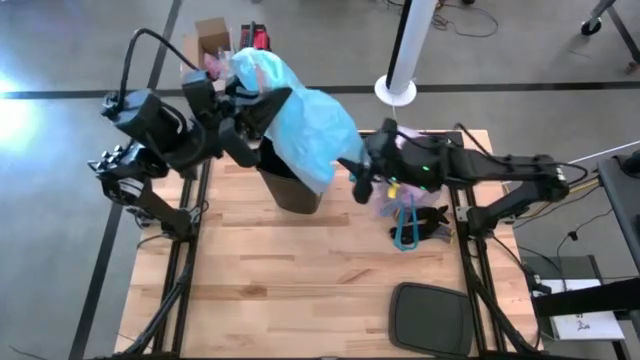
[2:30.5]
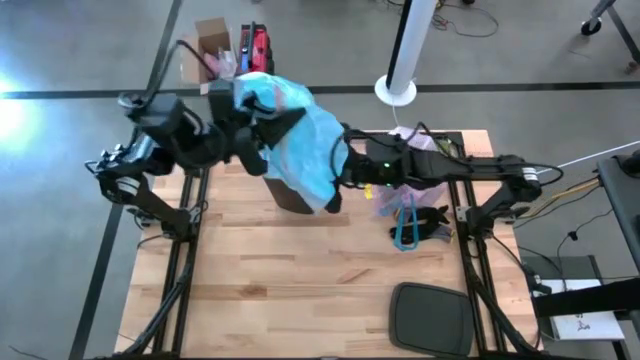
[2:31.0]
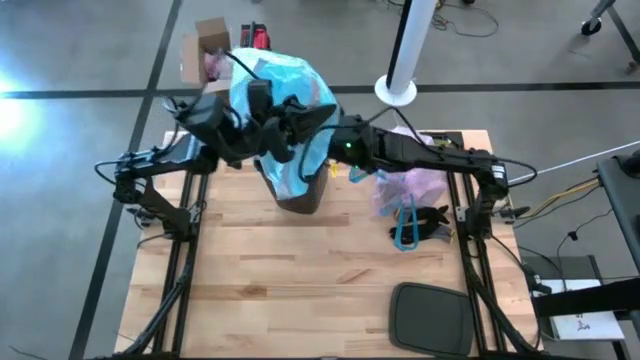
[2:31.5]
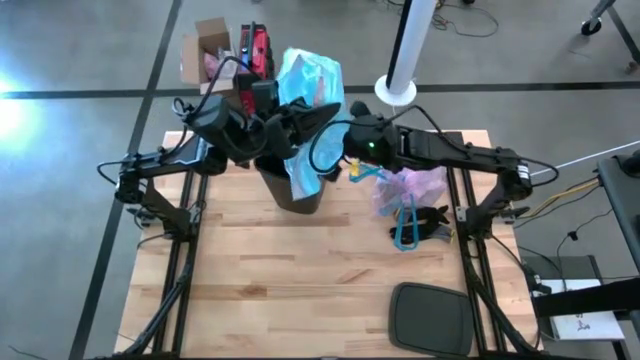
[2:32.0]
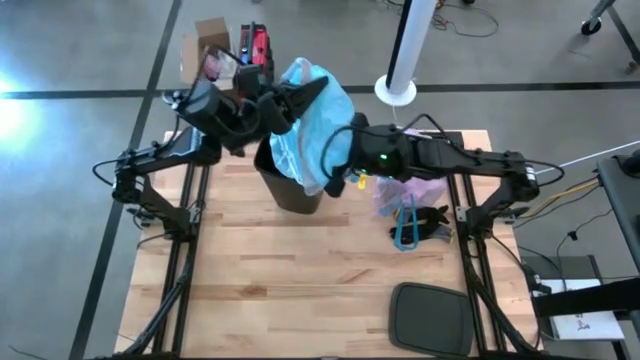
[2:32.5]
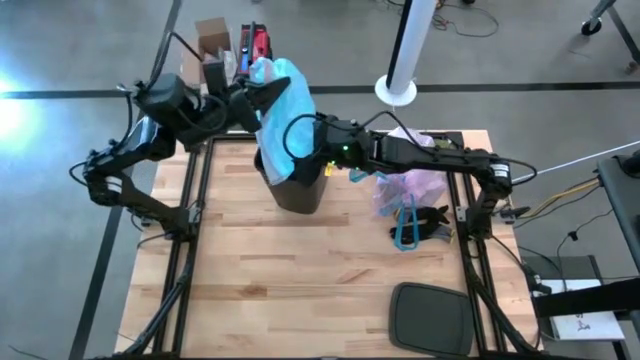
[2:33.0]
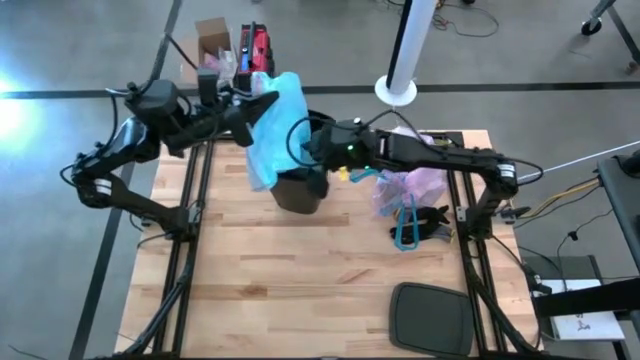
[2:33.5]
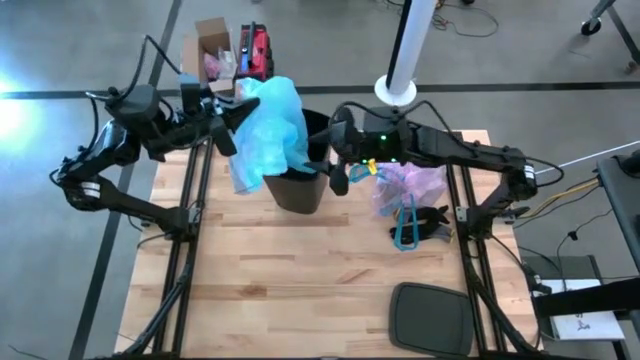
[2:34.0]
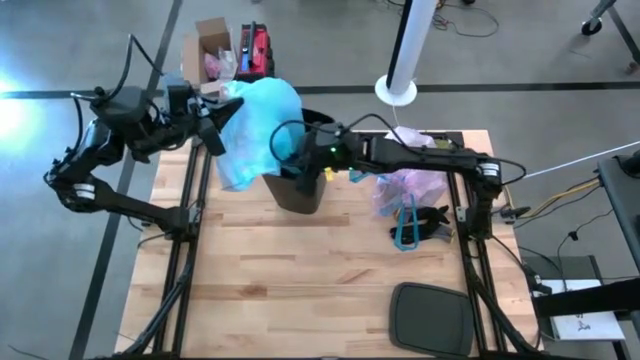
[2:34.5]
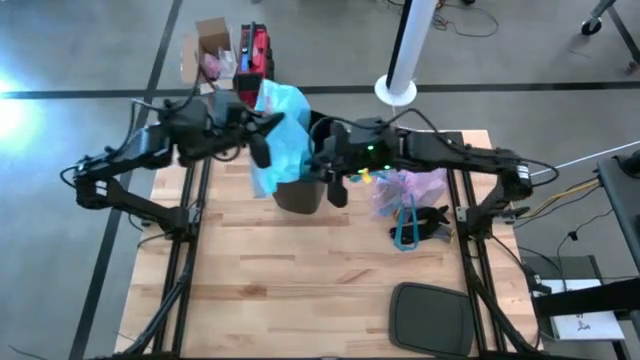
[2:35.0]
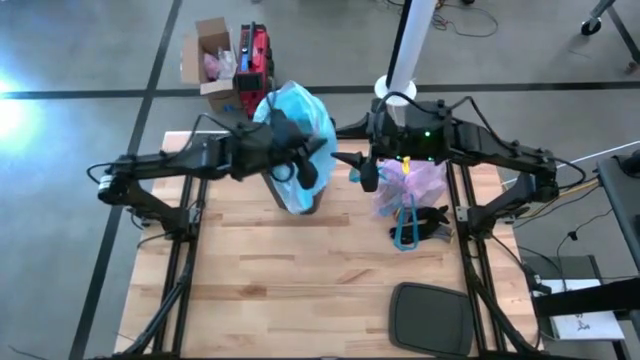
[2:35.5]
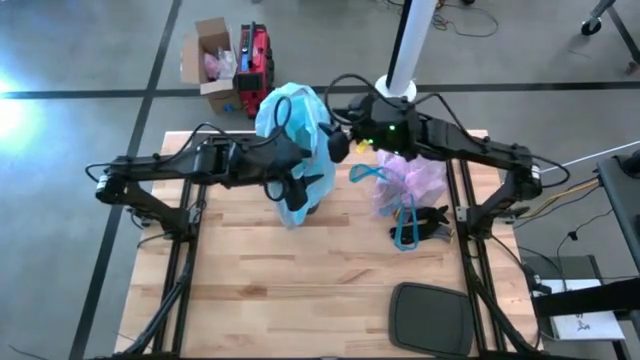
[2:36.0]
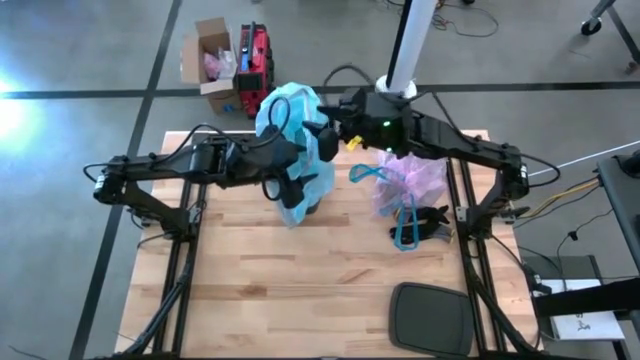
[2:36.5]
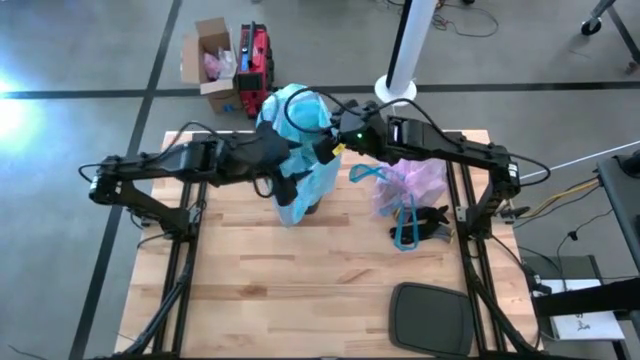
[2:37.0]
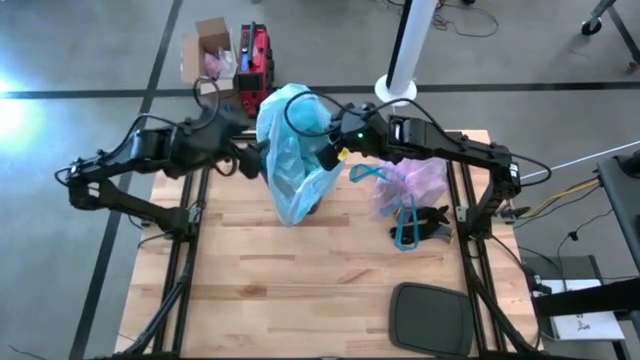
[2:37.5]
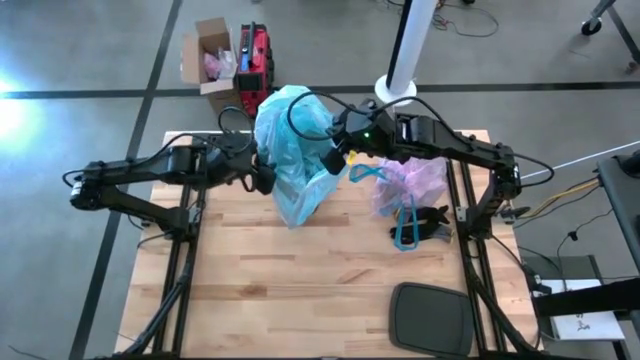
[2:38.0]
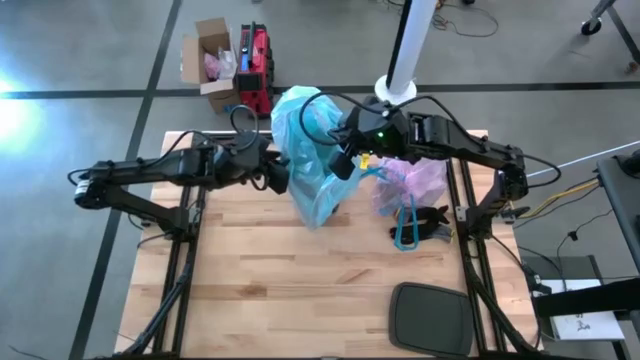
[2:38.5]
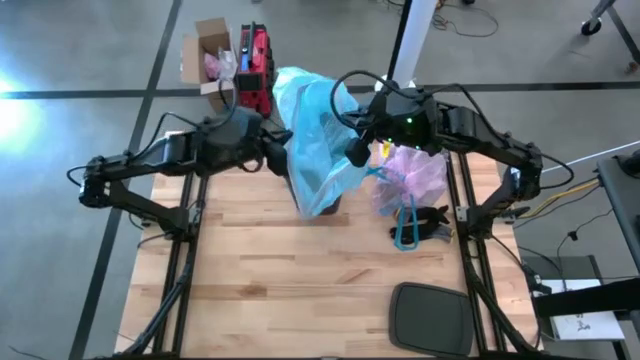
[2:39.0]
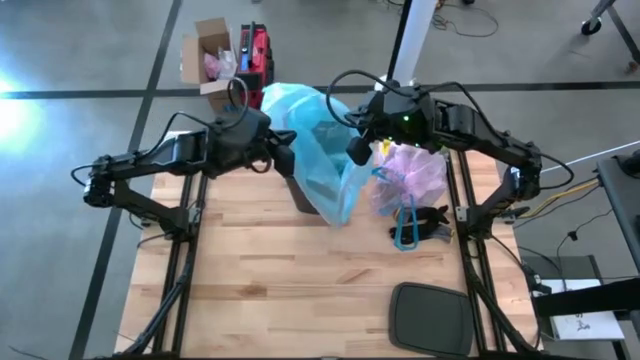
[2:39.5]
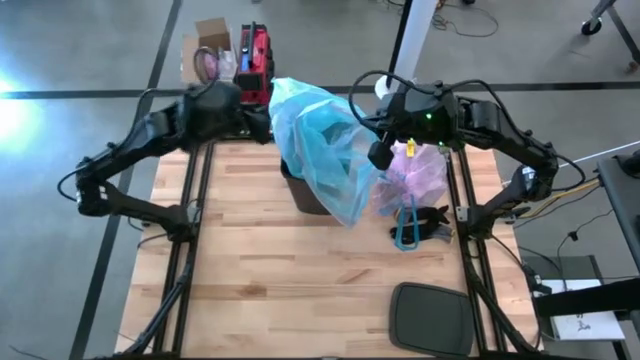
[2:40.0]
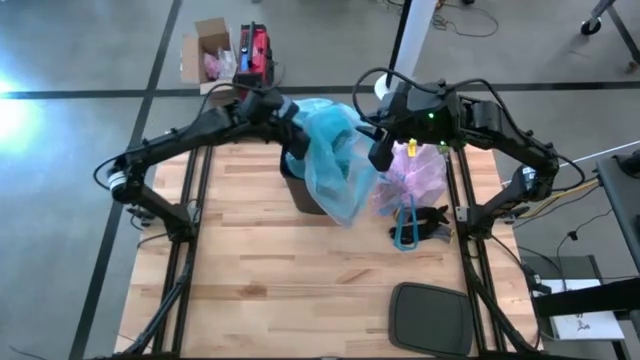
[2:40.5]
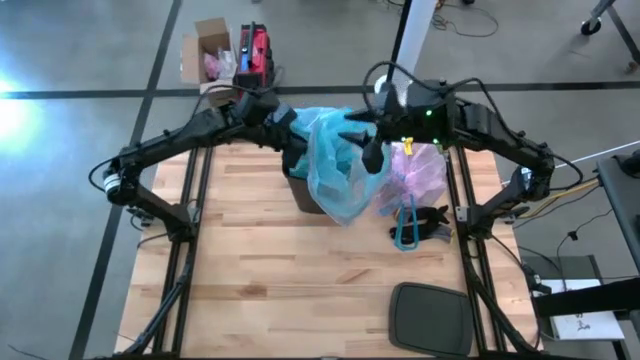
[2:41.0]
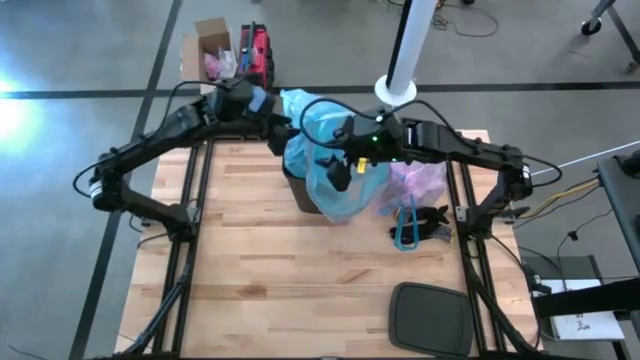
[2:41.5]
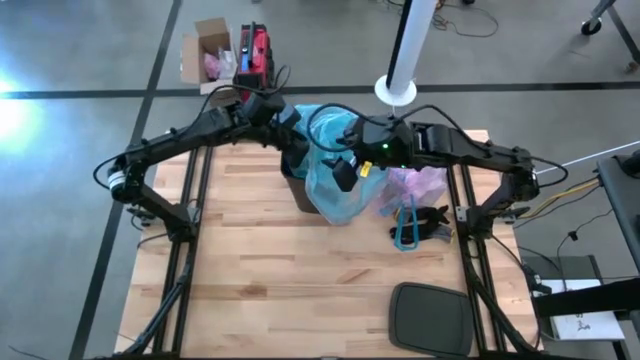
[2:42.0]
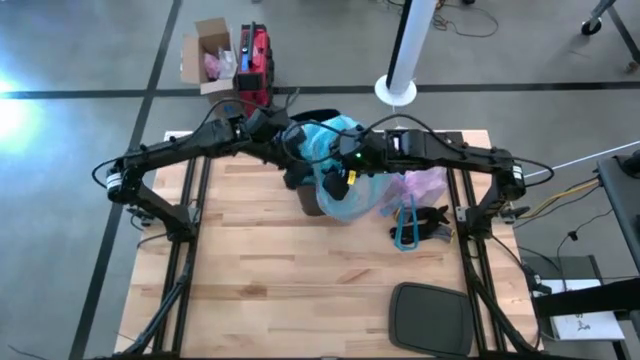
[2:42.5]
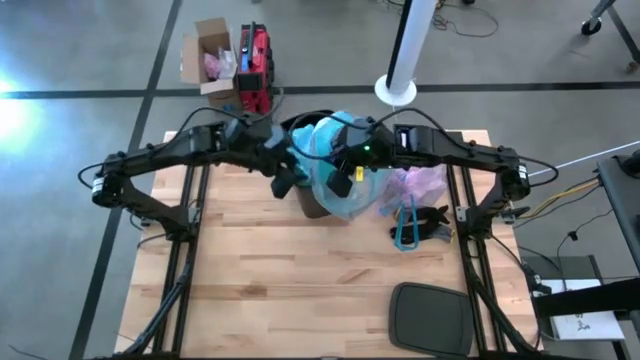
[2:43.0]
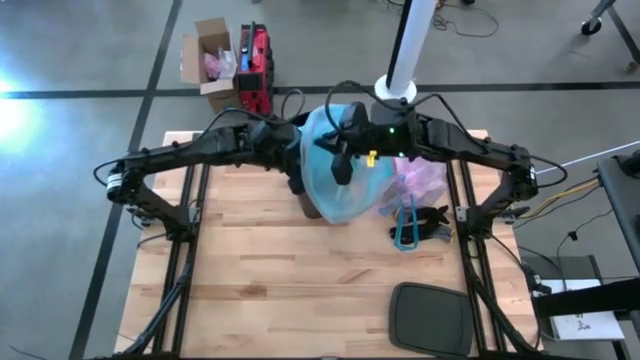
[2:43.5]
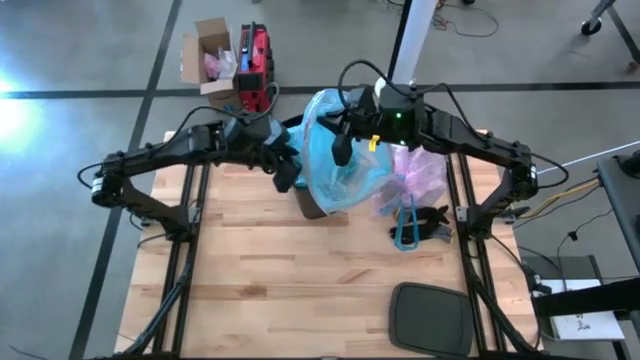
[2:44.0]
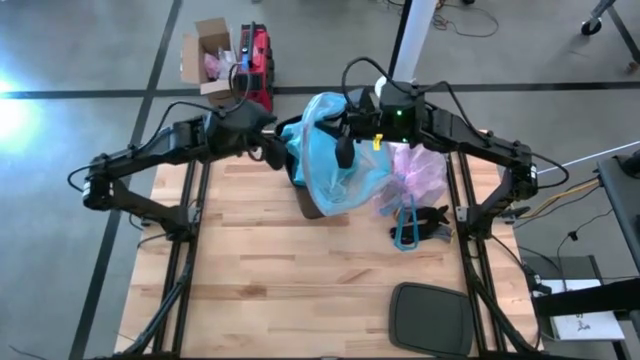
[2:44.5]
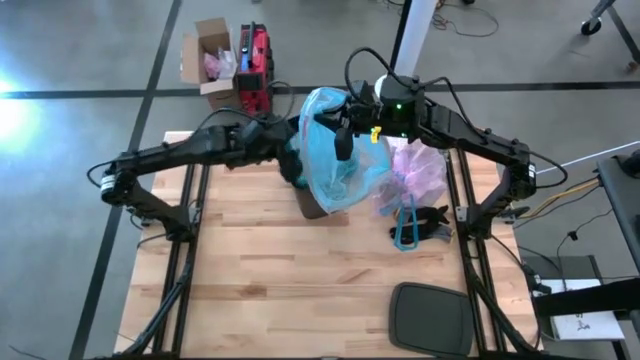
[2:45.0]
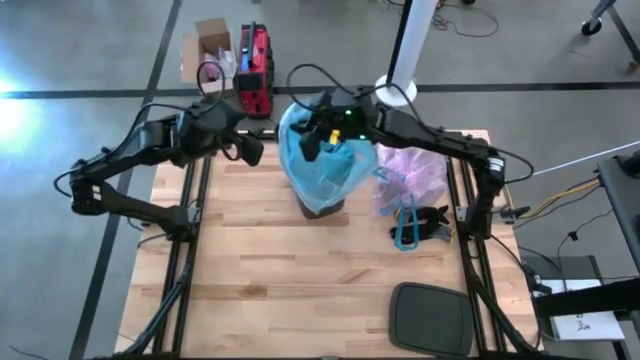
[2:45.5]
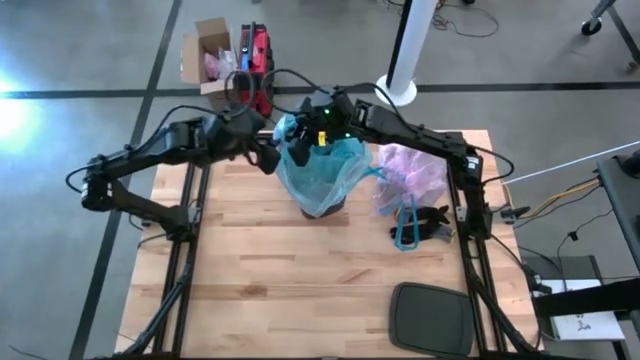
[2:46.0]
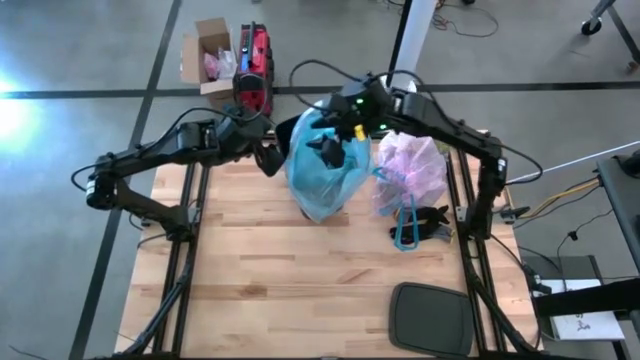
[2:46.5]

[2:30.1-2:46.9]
Task: place trash/remove bag and relplace
Insert the new blue trash bag into the trash bin

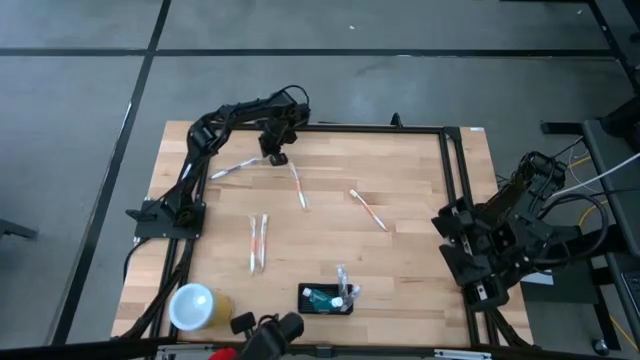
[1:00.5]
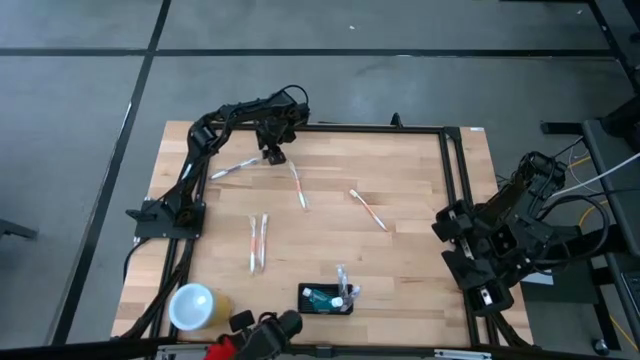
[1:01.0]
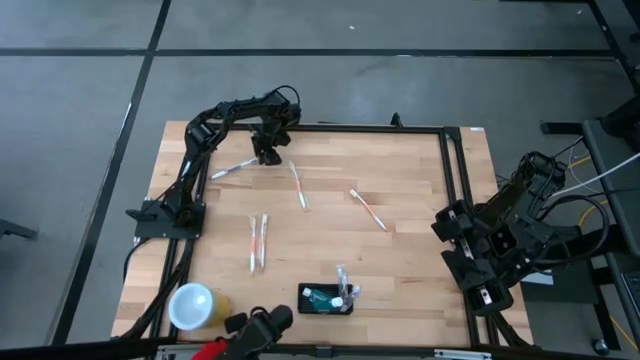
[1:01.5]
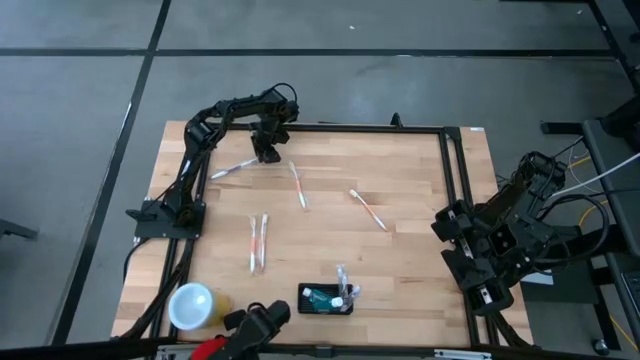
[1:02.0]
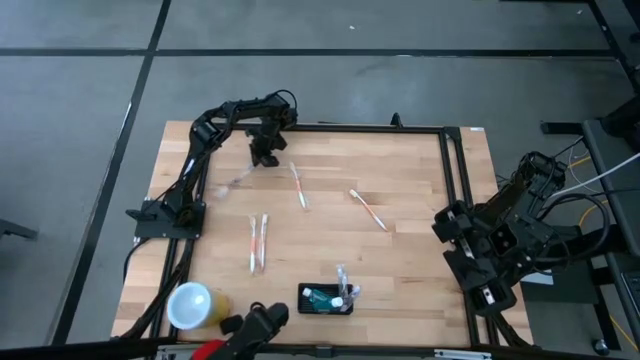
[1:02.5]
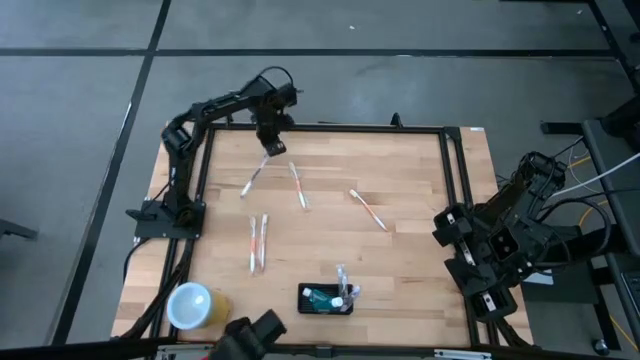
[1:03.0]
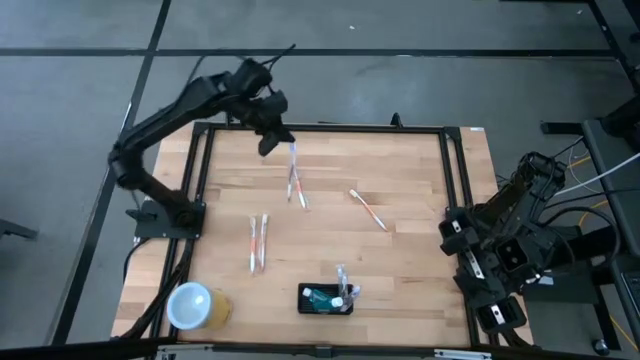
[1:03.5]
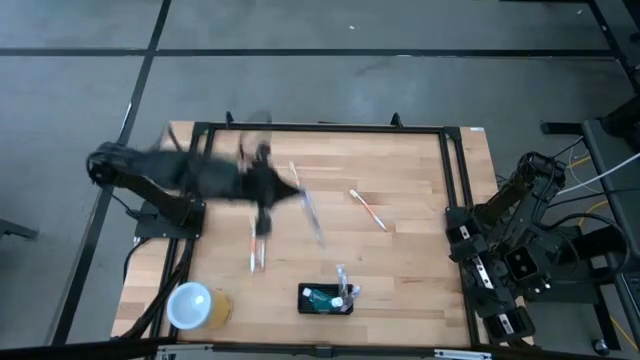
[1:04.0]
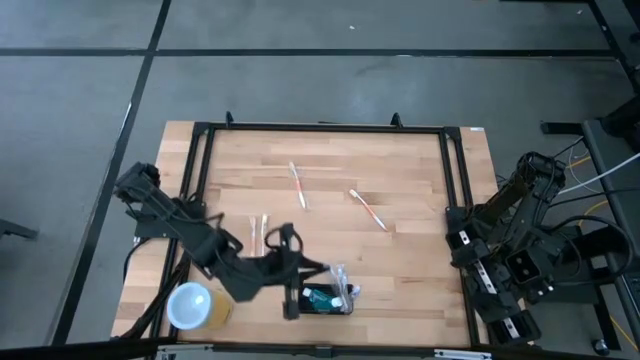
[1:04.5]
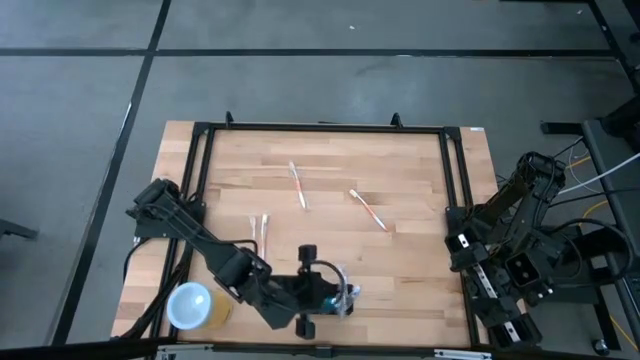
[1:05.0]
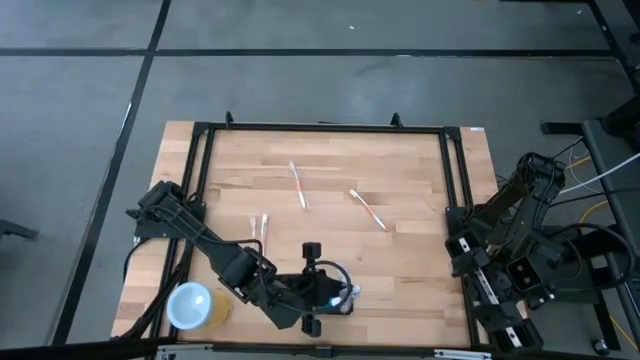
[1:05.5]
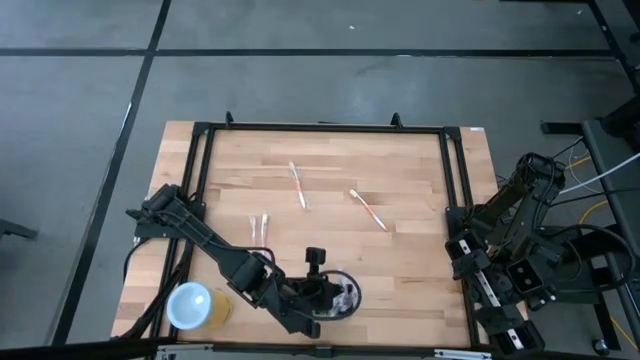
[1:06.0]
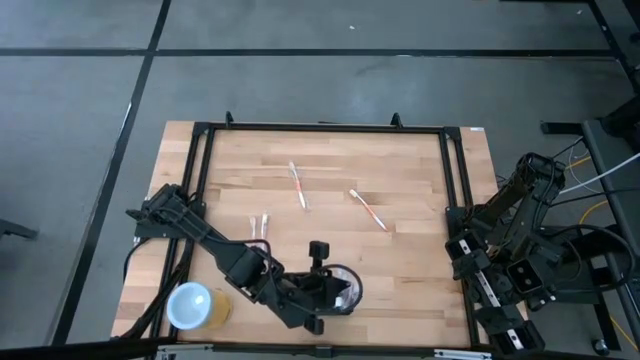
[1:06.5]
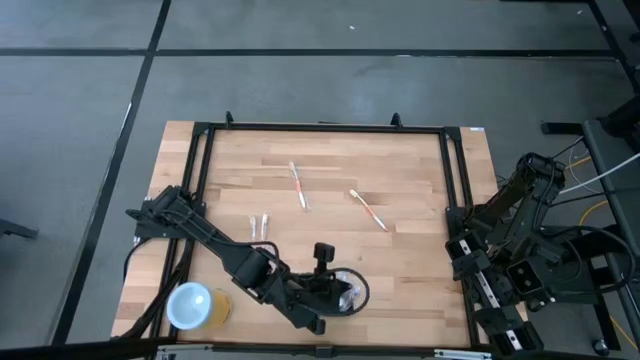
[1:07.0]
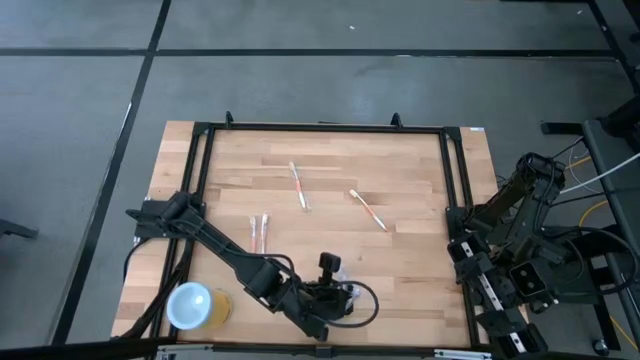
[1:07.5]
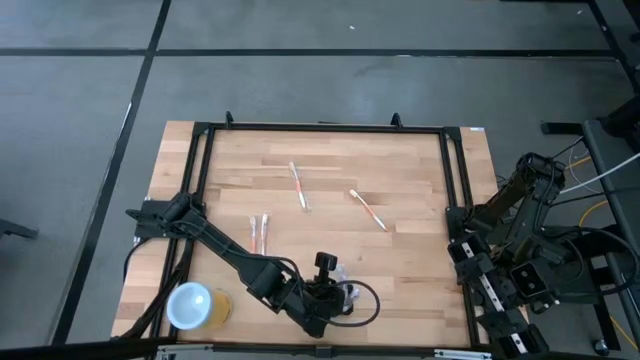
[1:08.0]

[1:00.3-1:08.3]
Task: Pick & Place toothbrushing station
Put the purple toothbrush into the mesh organizer
